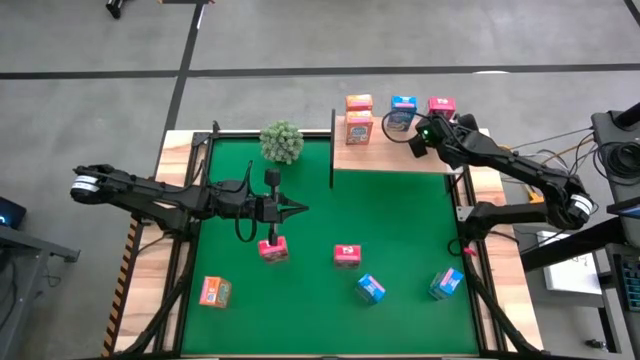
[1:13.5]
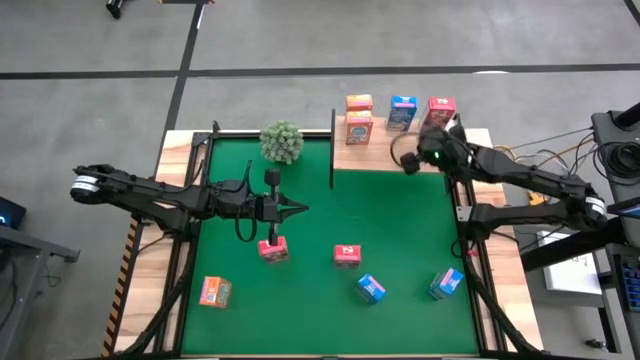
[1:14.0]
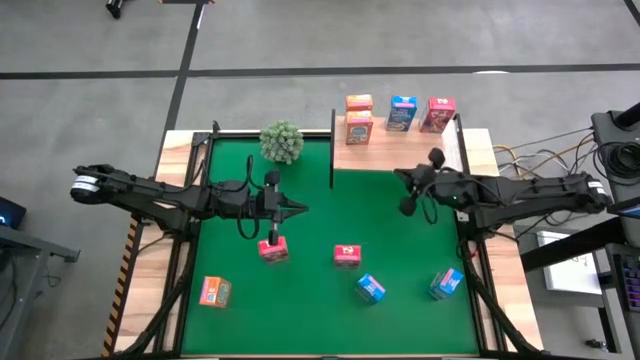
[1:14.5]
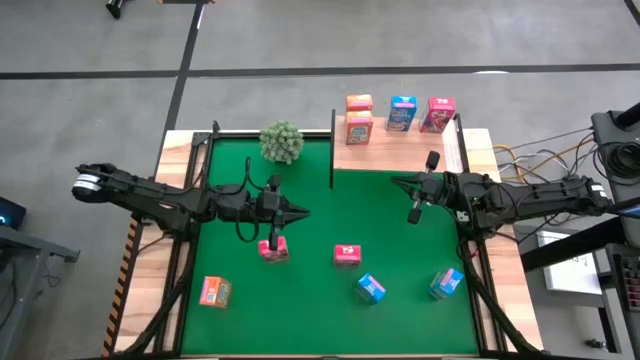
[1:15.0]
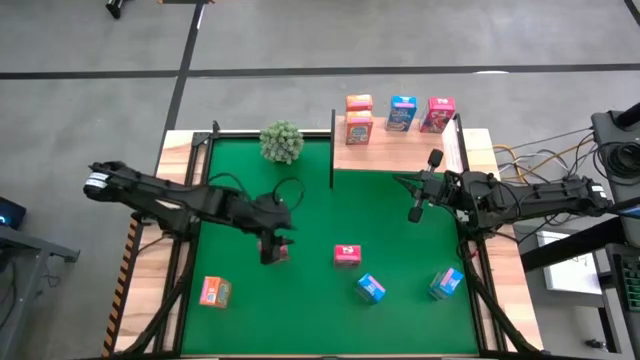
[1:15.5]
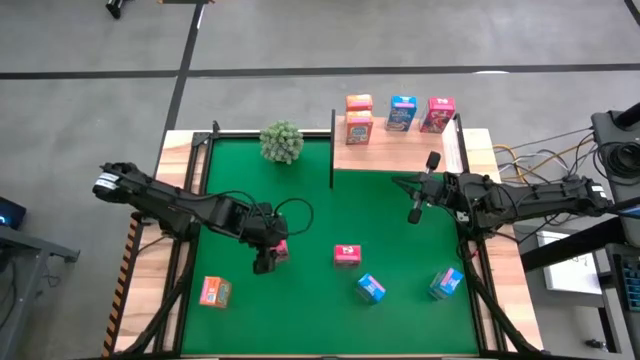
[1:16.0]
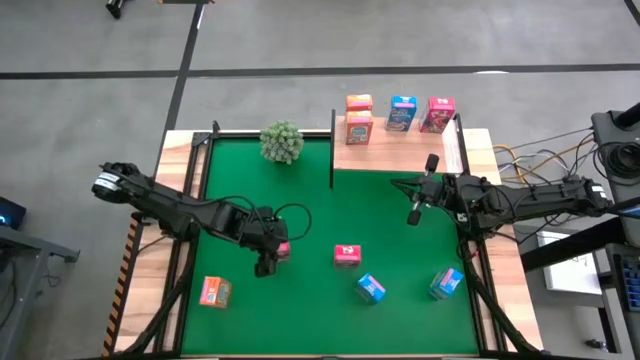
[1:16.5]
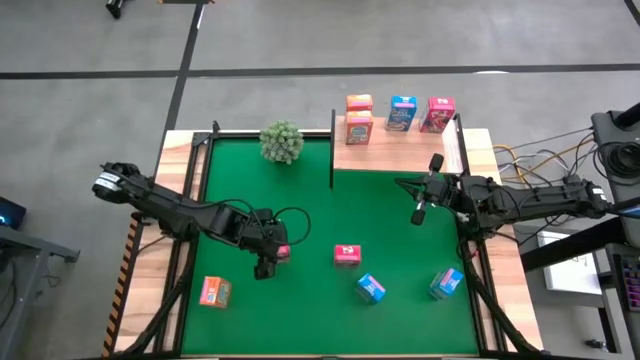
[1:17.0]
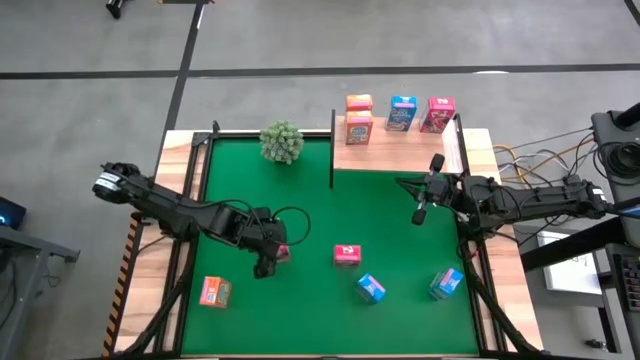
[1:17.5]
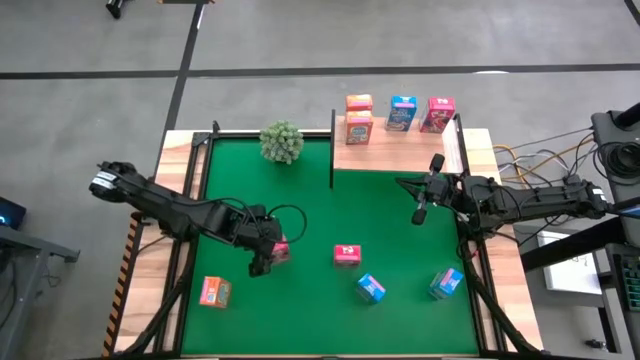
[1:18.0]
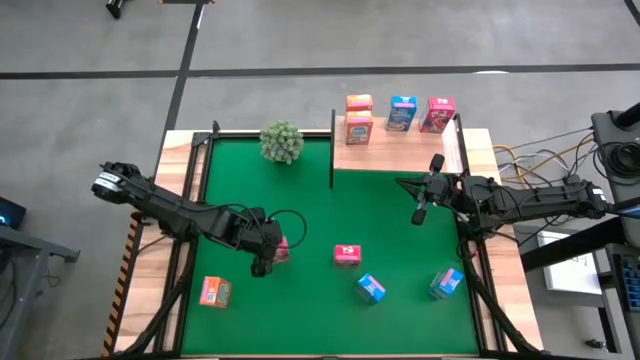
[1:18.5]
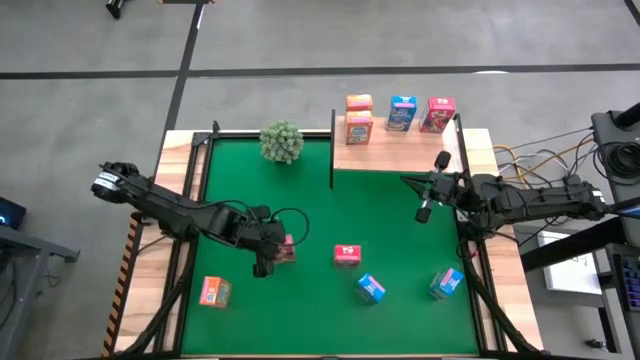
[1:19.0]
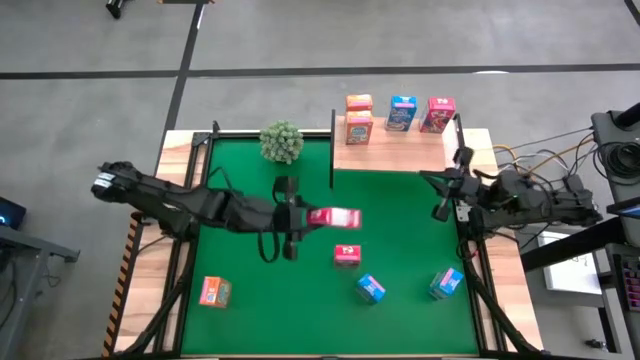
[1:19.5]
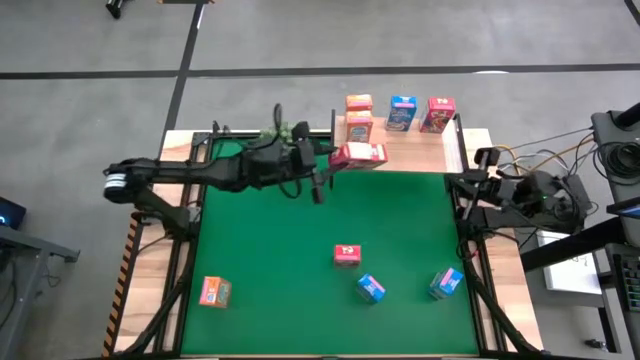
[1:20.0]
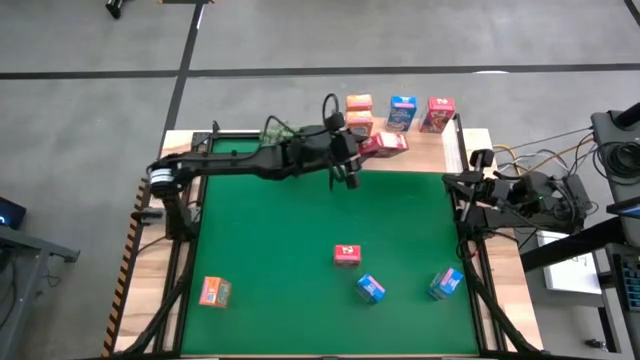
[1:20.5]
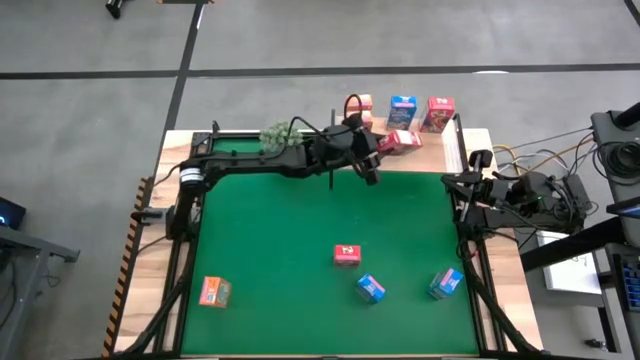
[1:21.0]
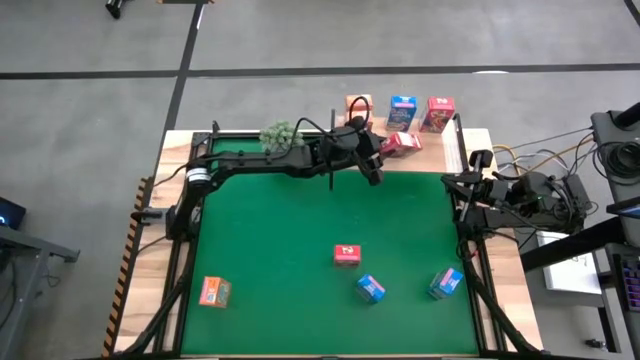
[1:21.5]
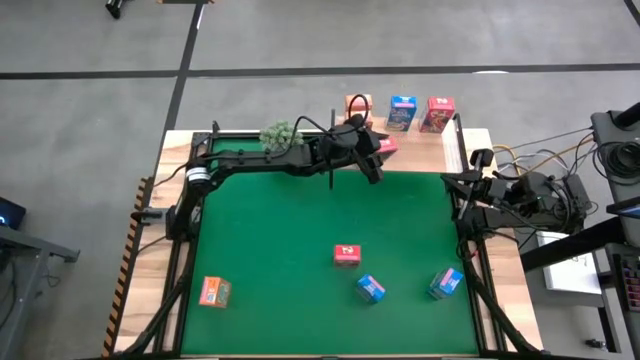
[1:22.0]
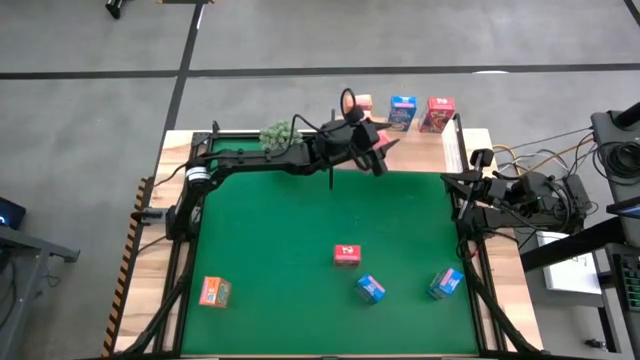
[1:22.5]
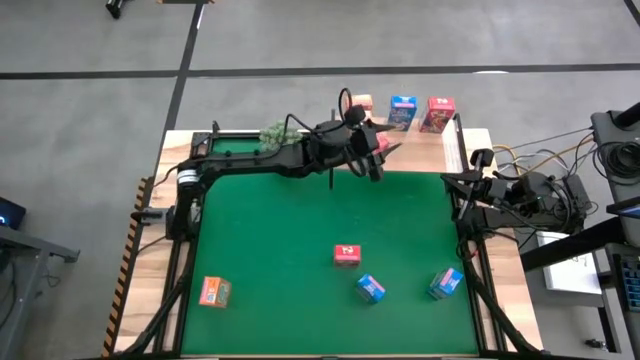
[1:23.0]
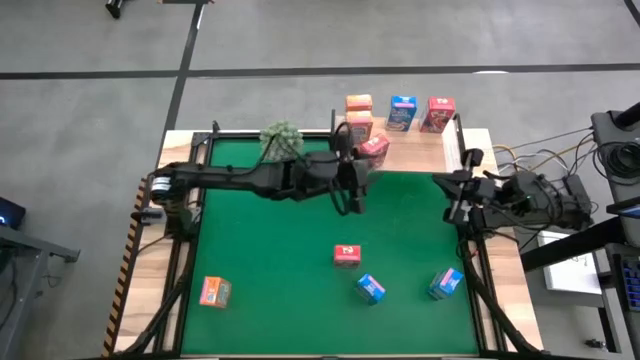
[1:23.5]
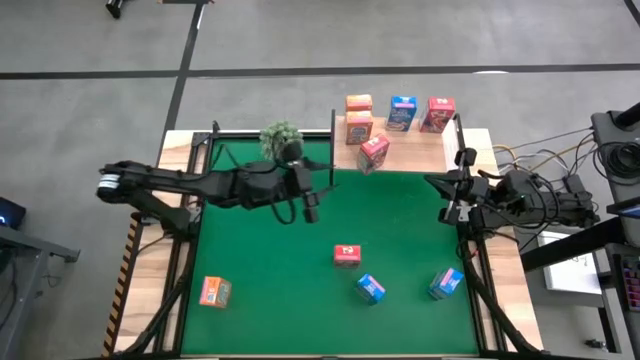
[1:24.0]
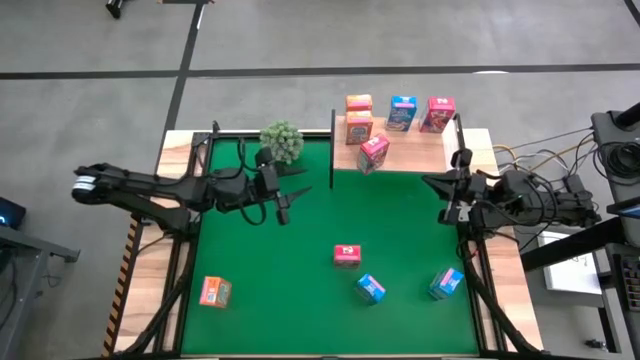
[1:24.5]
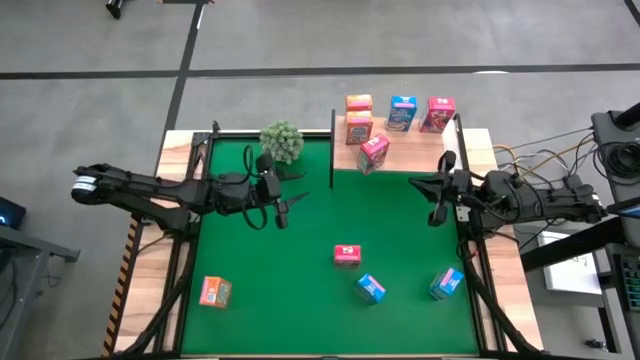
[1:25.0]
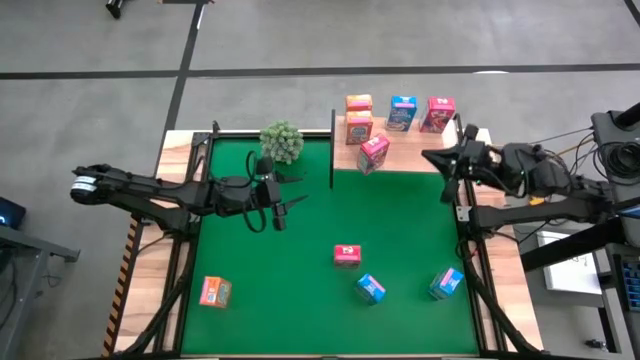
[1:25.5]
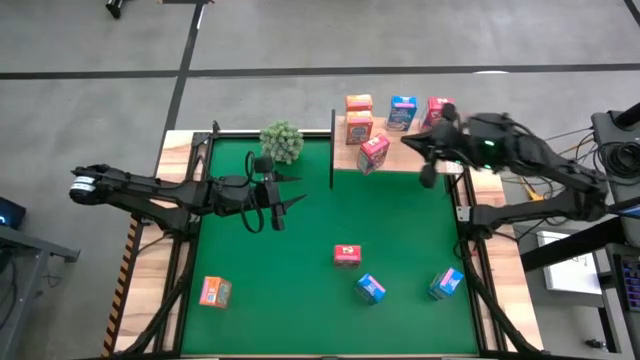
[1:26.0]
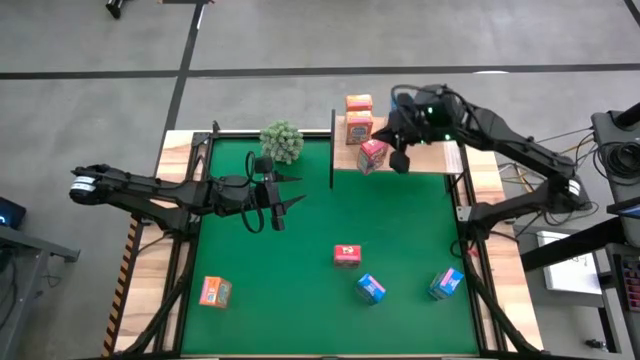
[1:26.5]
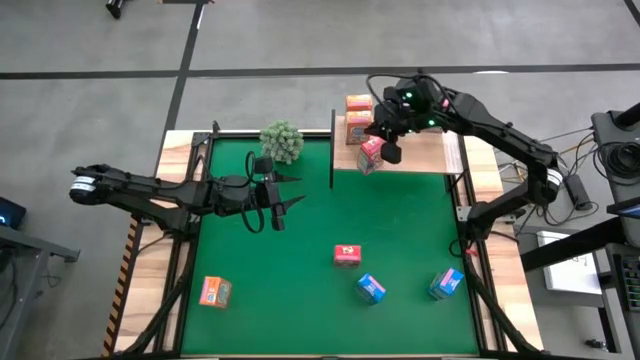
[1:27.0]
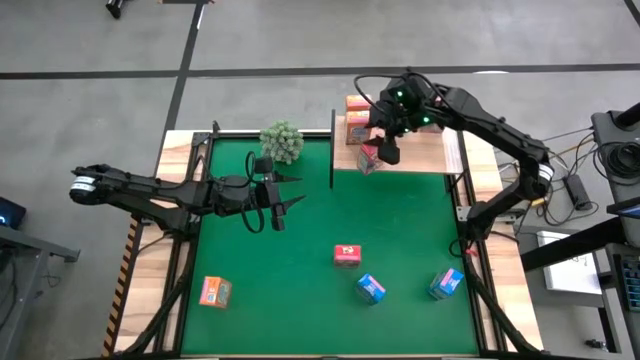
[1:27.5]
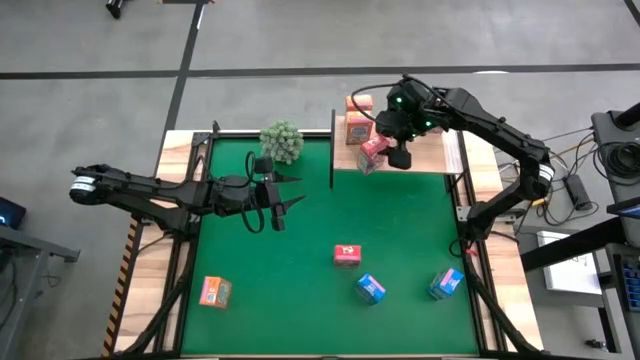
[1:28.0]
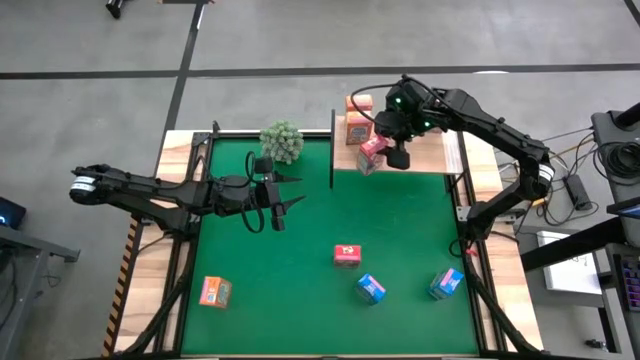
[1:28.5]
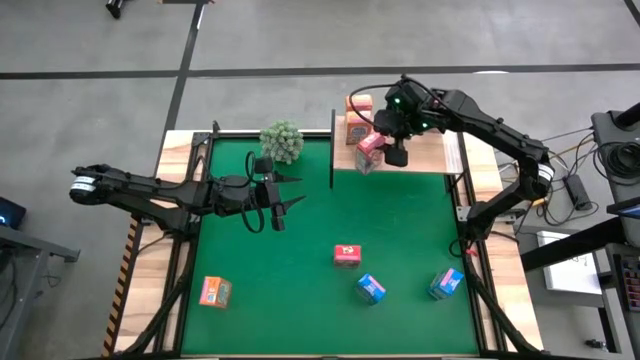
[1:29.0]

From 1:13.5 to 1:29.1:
Task: Stack cereal on shelf
Put the left red cereal box on the shelf

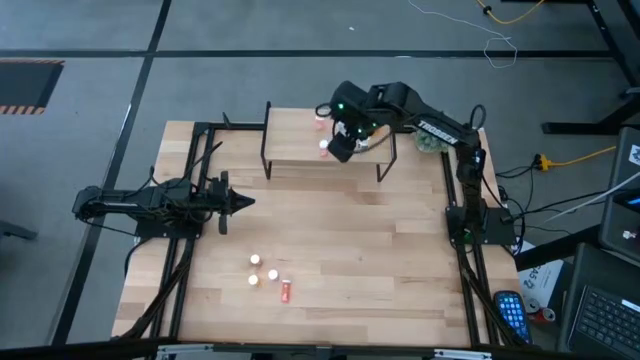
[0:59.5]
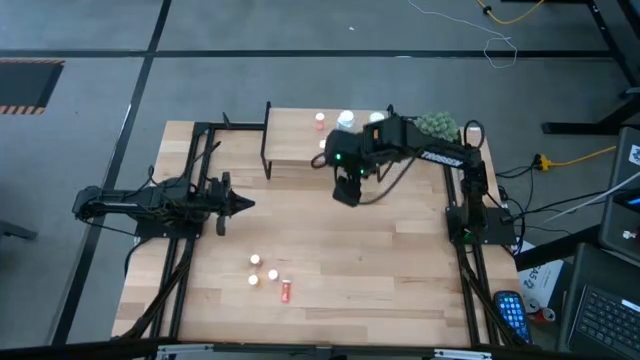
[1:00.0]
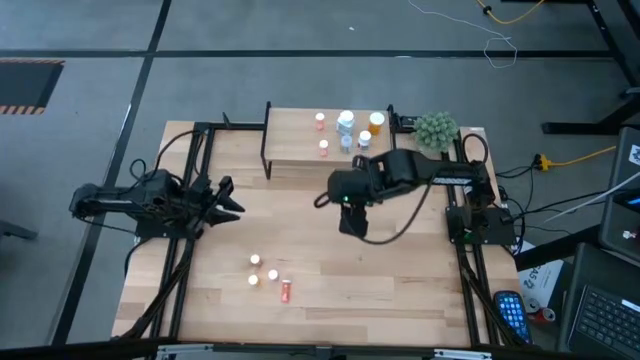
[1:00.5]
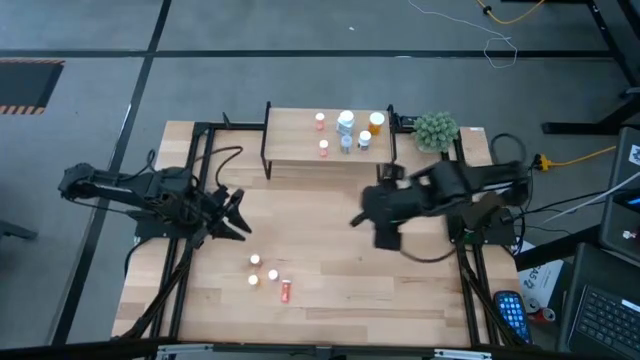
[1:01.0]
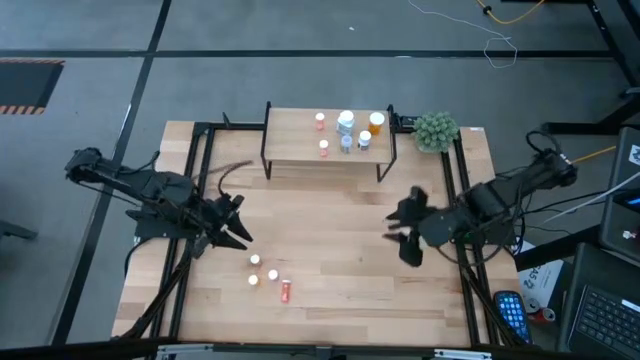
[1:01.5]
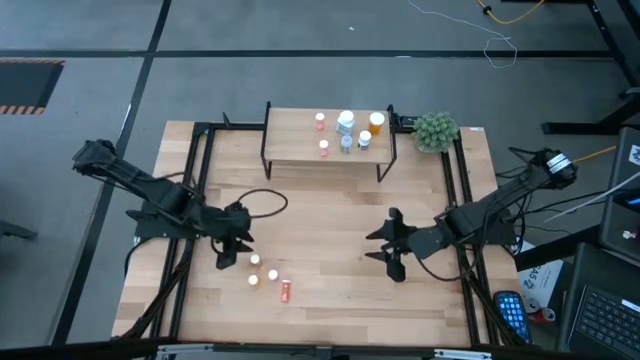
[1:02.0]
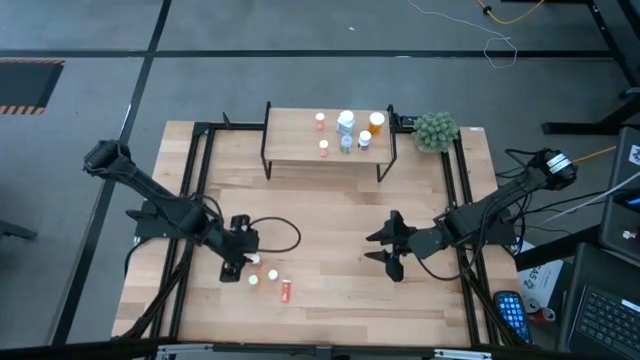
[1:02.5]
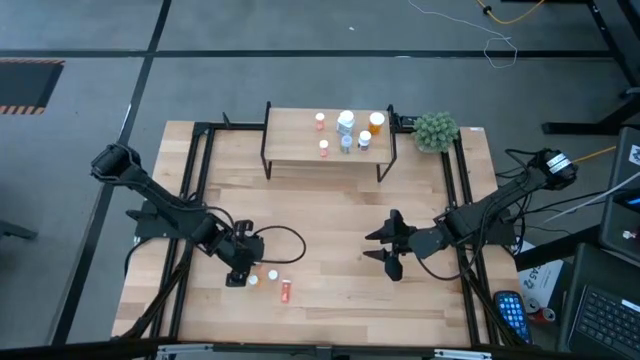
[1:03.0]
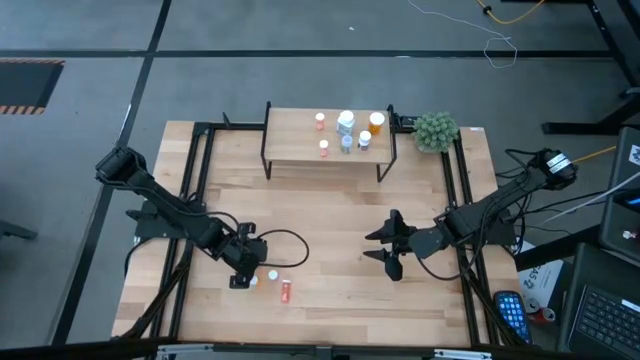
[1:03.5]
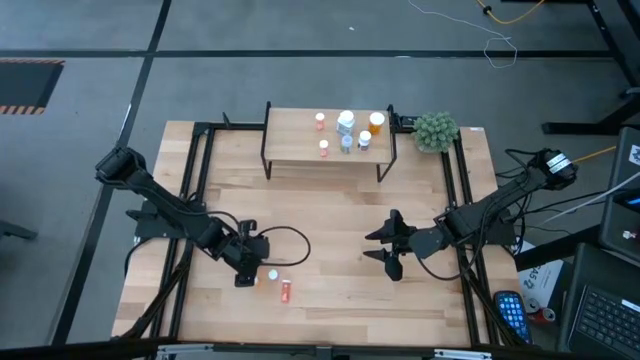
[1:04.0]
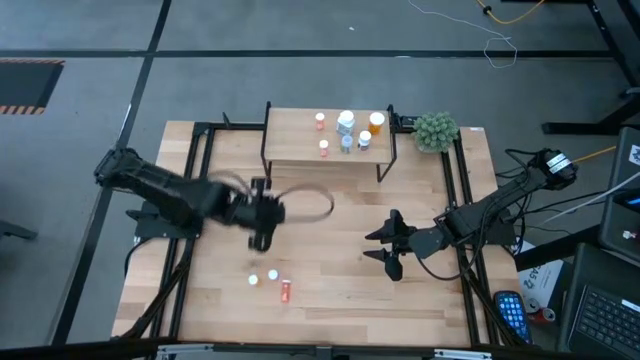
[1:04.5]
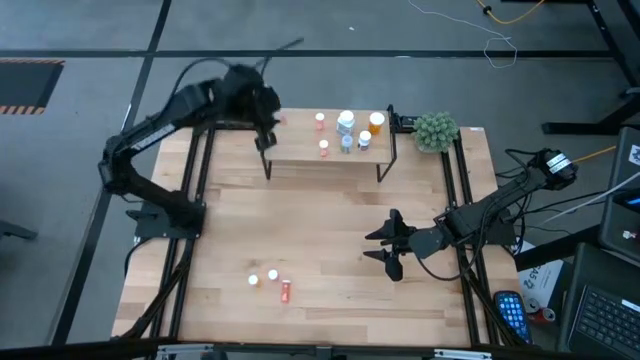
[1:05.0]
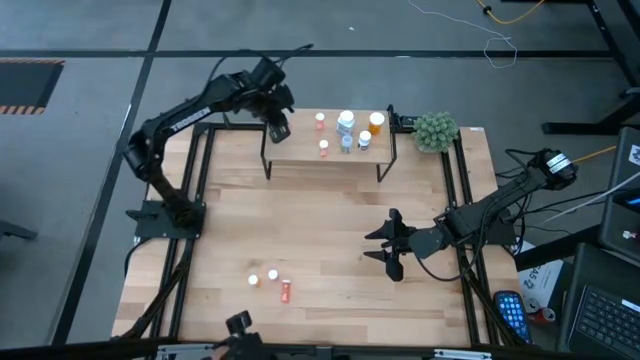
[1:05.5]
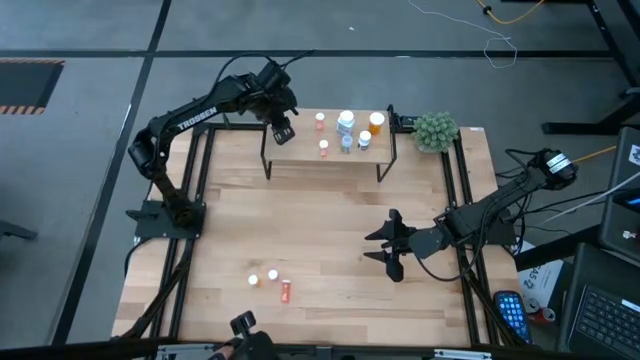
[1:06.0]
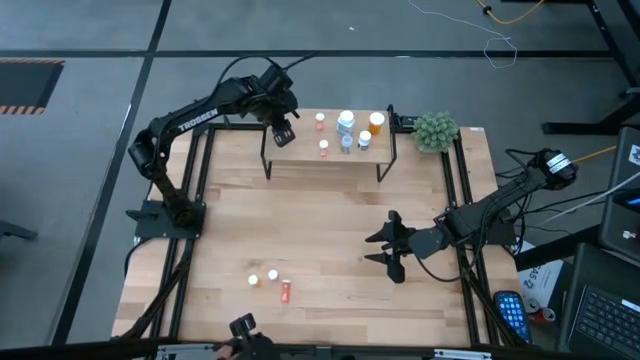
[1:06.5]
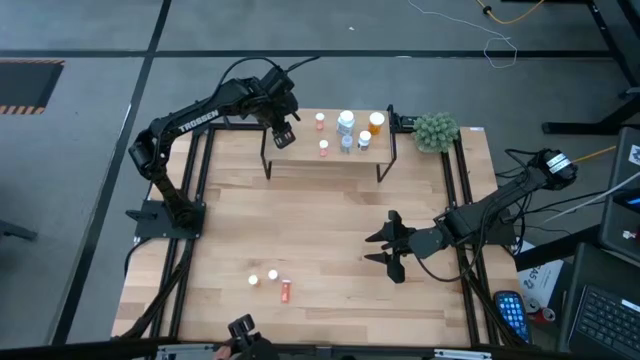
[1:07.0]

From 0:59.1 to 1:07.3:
Task: Pick and place medicine bottles onto shelf by color
Put the small light orange pill bottle on the shelf
